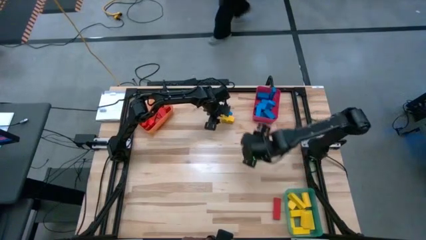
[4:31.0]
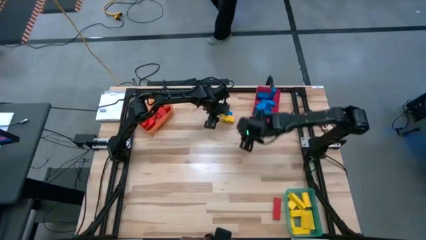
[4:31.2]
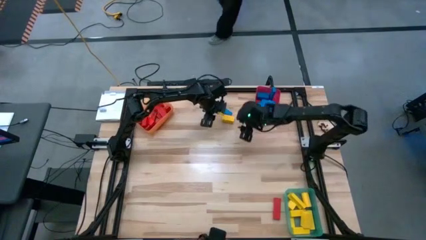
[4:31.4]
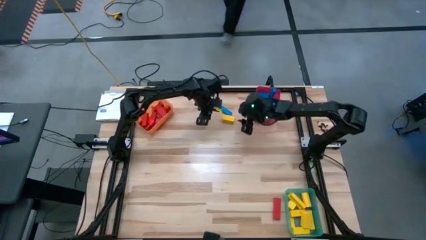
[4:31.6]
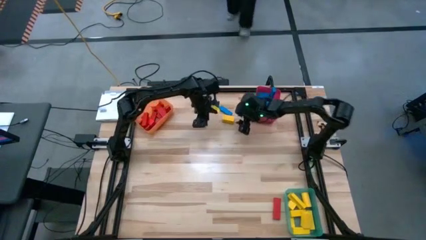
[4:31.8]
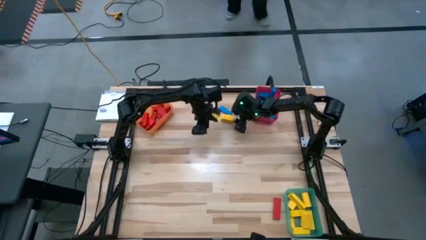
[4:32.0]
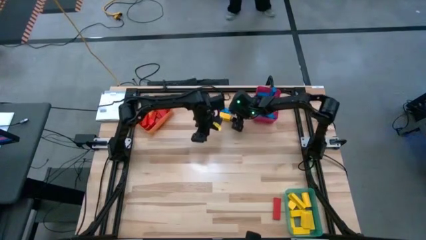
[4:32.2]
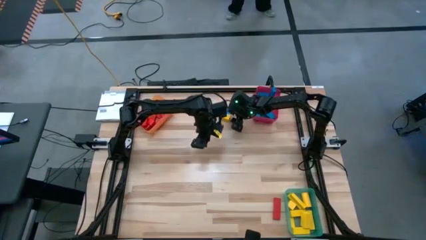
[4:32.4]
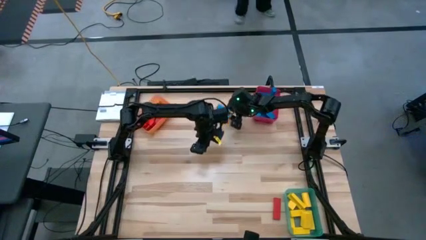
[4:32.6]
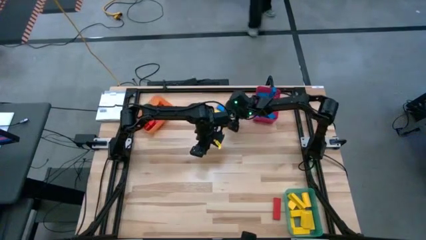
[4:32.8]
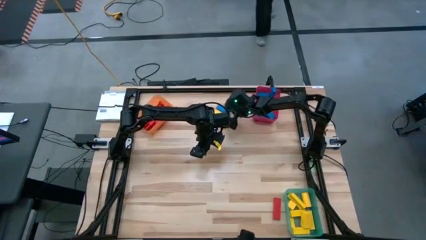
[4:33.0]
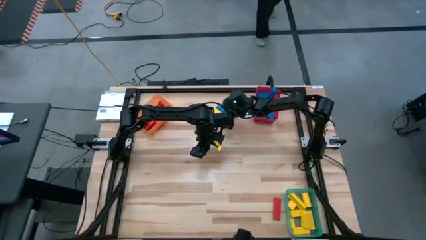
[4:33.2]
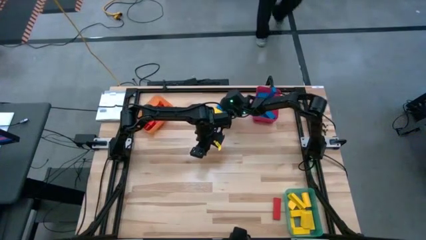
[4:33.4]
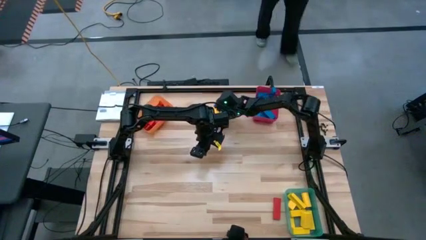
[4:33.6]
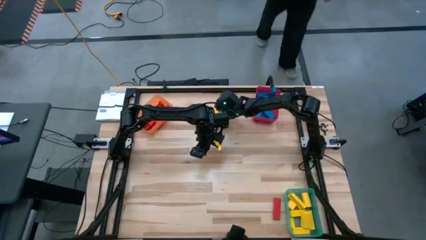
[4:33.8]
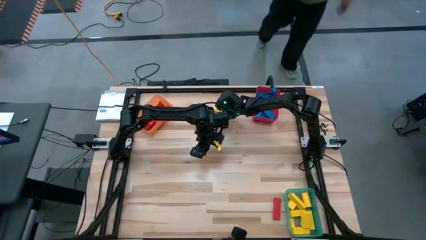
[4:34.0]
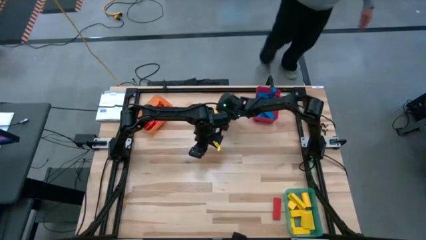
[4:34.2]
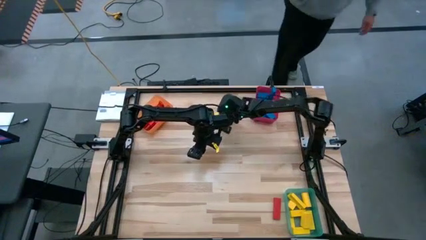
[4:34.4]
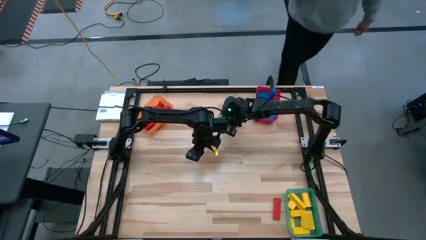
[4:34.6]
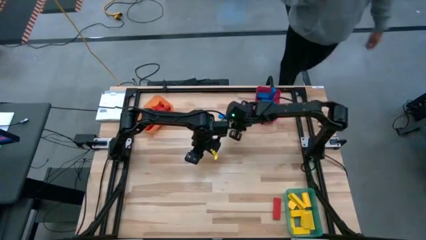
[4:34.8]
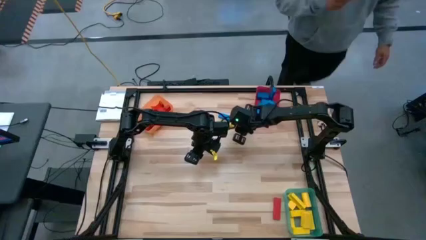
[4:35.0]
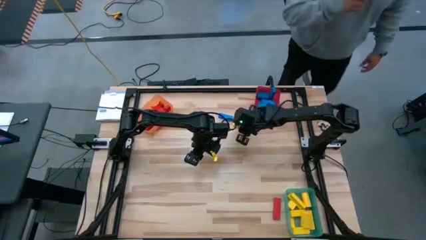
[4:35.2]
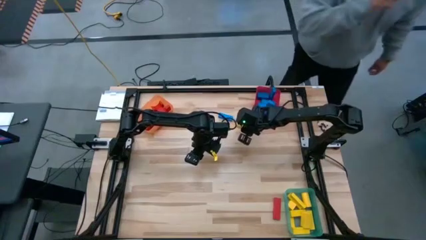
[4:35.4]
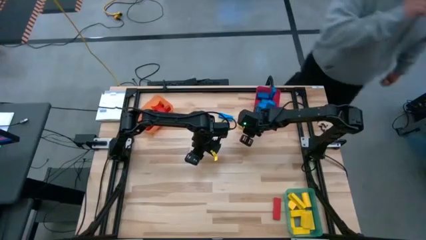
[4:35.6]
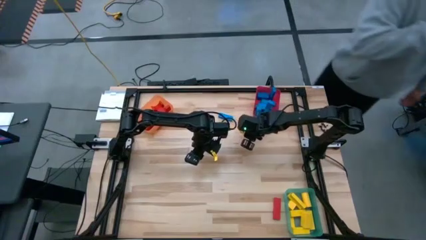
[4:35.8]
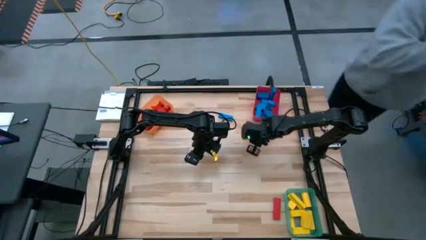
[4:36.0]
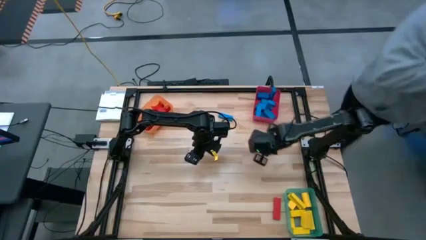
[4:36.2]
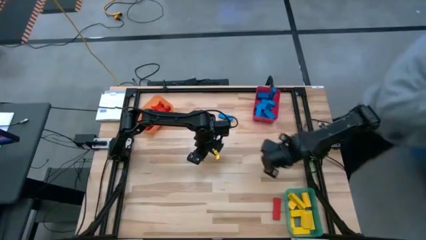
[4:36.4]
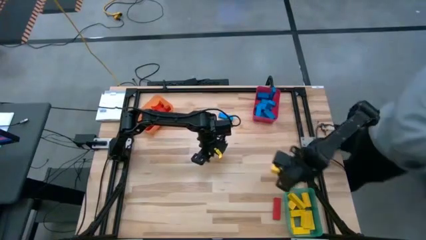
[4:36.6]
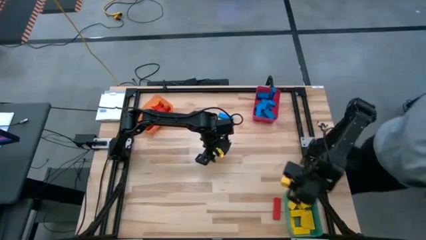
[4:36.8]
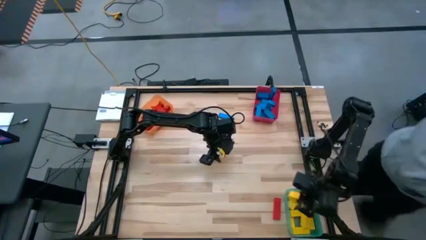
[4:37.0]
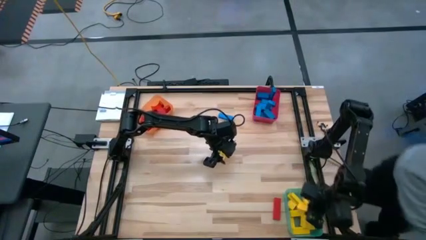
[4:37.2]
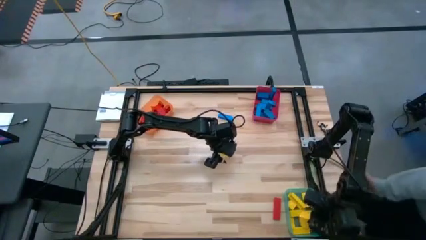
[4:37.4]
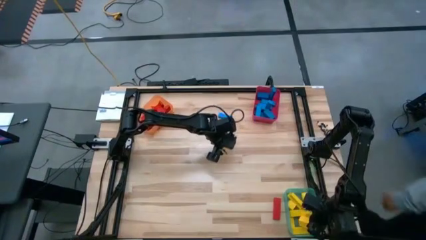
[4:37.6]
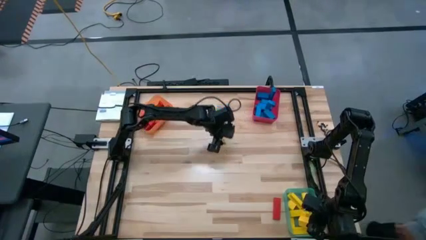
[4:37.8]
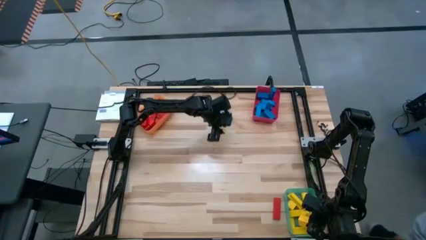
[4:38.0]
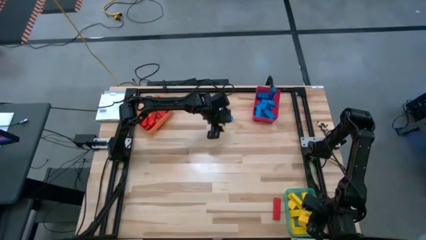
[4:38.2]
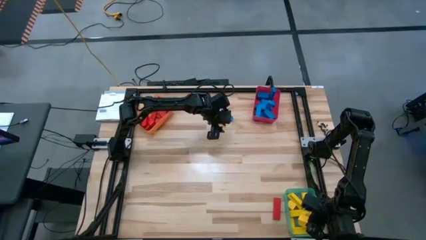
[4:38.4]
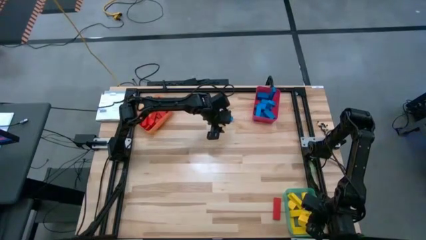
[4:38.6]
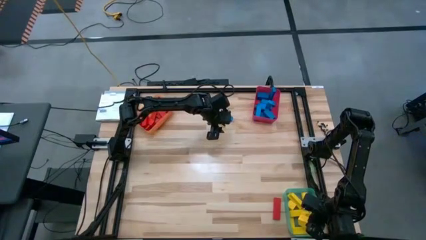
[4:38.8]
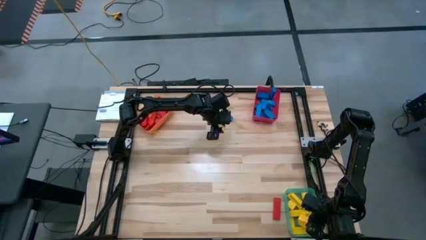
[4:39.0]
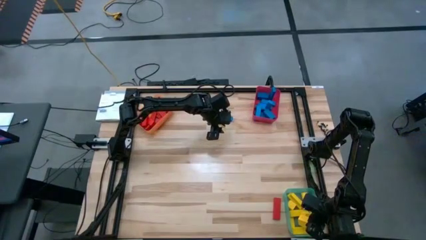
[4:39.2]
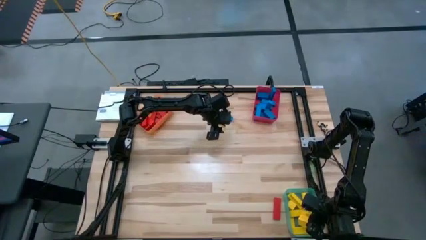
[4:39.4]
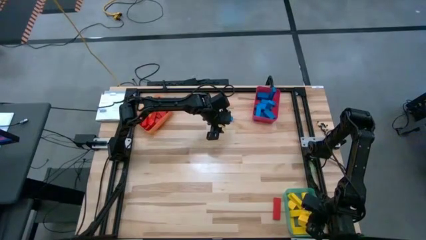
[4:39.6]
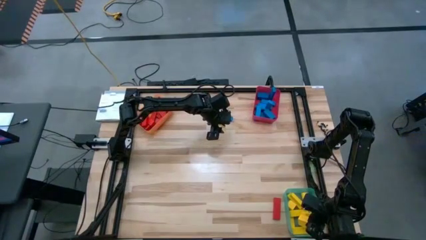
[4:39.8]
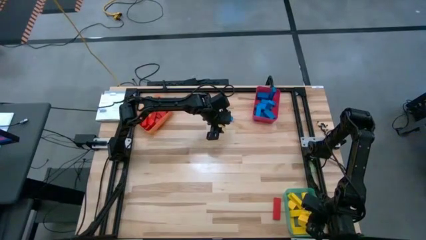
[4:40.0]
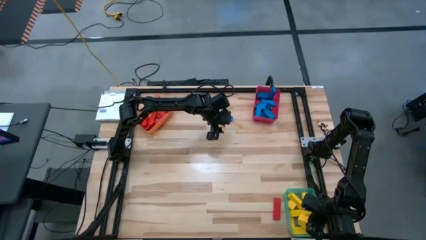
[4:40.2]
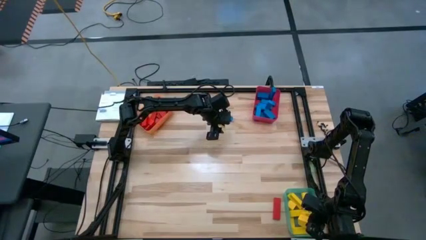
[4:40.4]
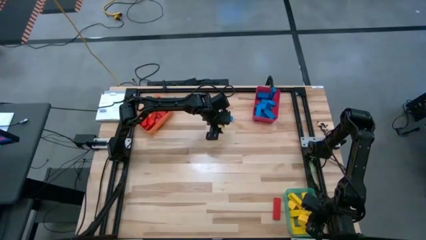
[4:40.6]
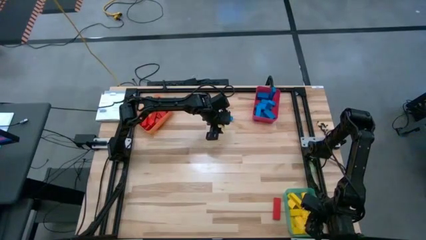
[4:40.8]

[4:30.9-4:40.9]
Task: Sort blocks
Put the yellow block into the green bin

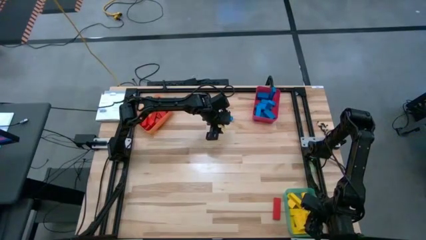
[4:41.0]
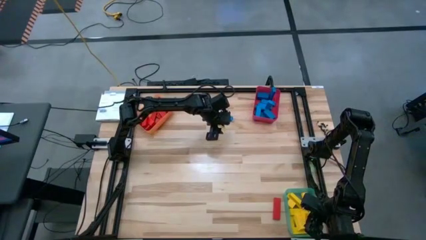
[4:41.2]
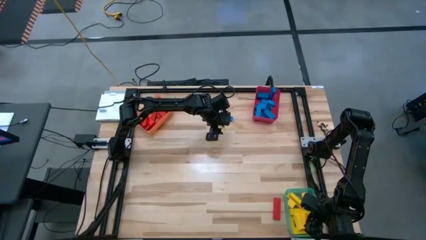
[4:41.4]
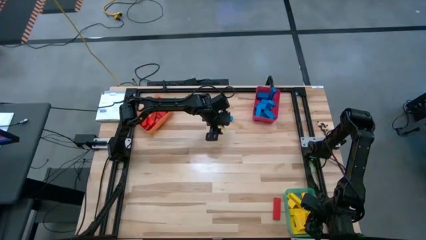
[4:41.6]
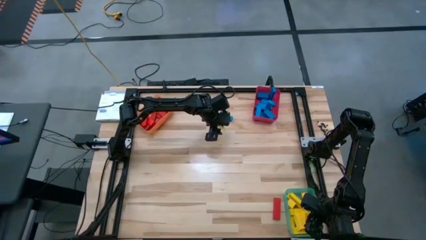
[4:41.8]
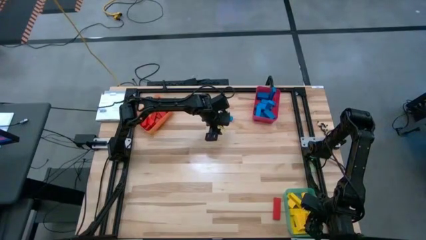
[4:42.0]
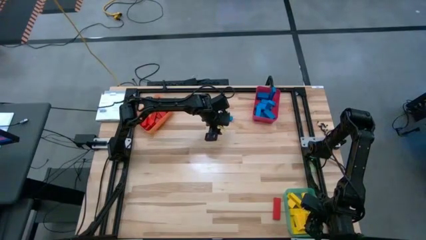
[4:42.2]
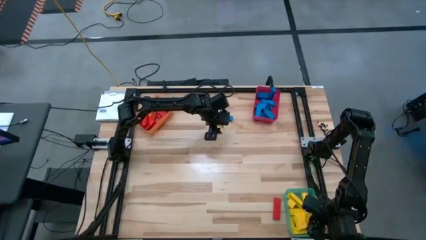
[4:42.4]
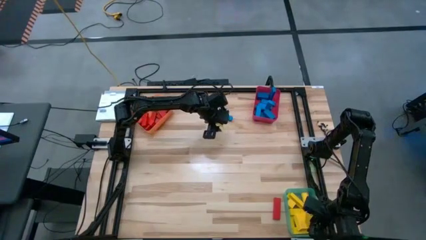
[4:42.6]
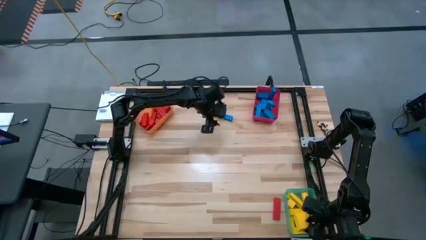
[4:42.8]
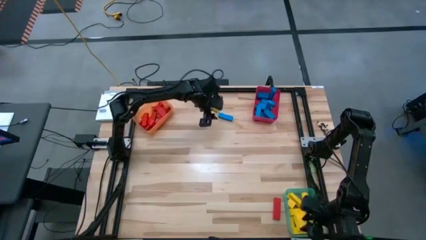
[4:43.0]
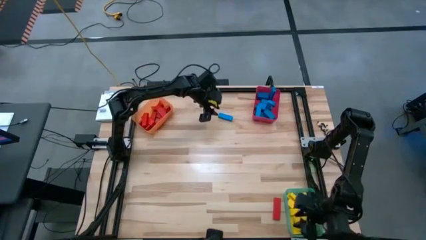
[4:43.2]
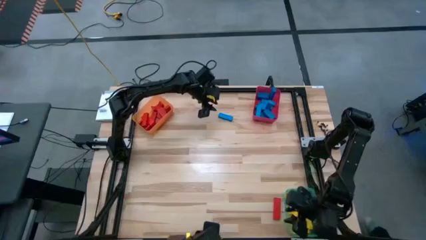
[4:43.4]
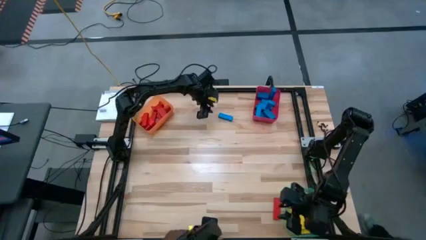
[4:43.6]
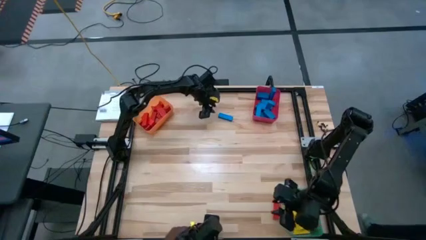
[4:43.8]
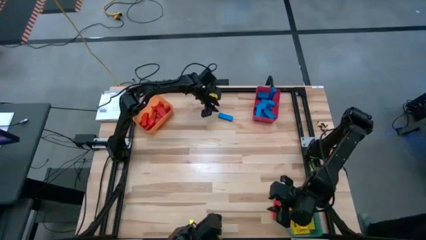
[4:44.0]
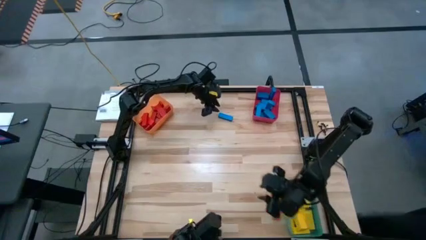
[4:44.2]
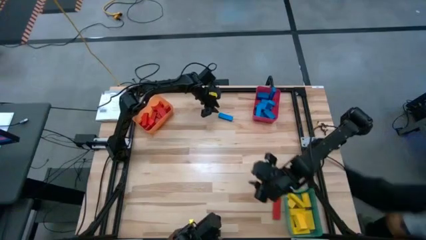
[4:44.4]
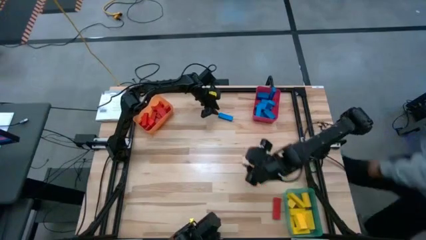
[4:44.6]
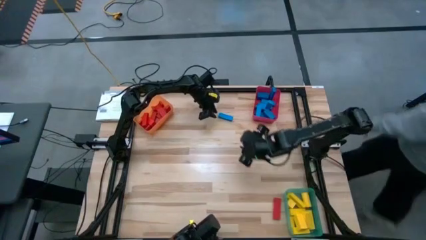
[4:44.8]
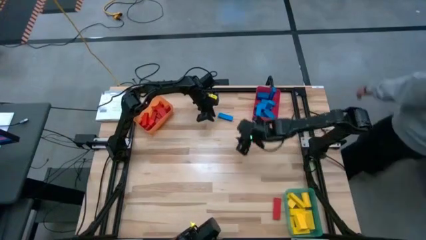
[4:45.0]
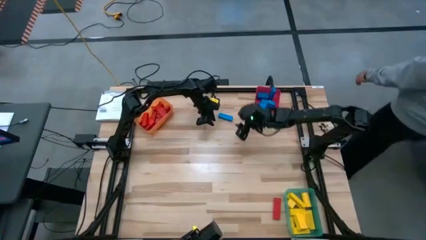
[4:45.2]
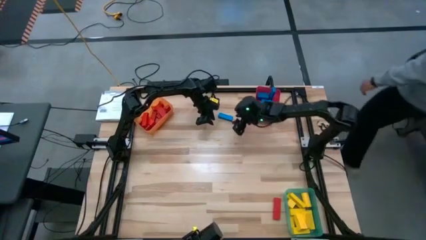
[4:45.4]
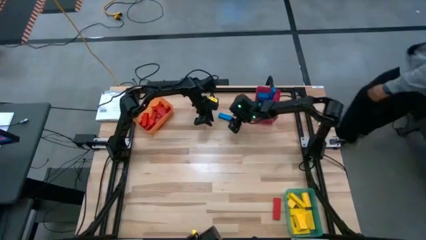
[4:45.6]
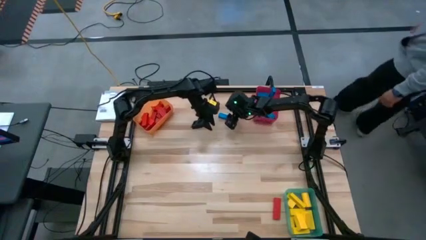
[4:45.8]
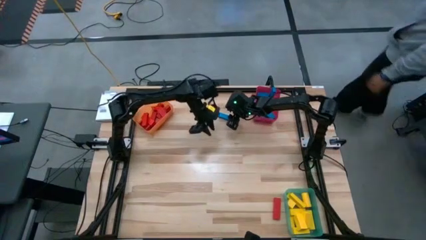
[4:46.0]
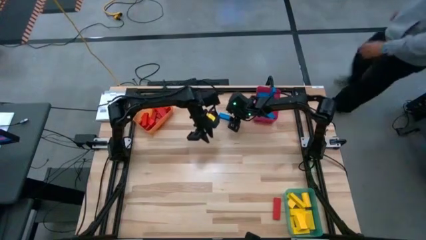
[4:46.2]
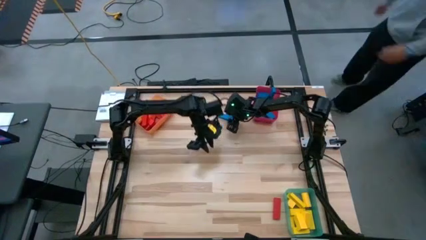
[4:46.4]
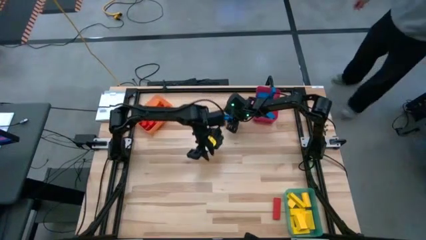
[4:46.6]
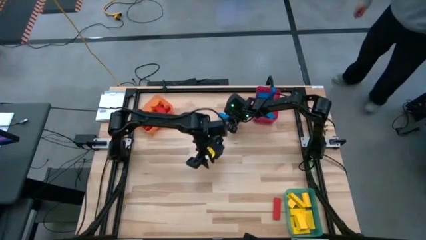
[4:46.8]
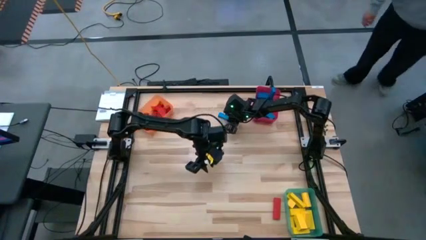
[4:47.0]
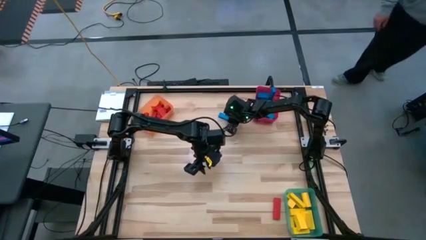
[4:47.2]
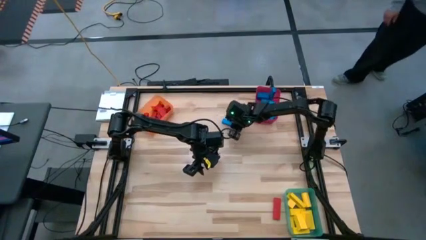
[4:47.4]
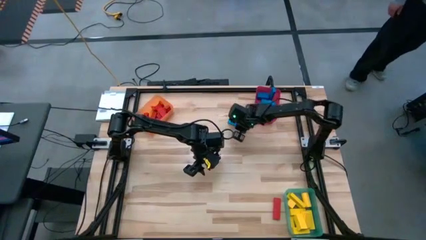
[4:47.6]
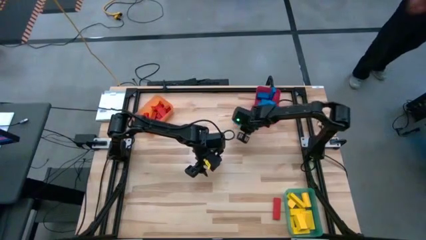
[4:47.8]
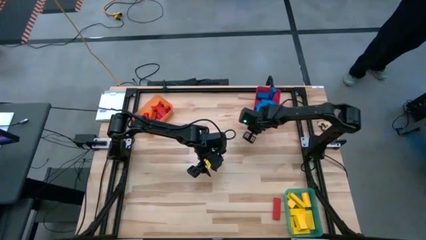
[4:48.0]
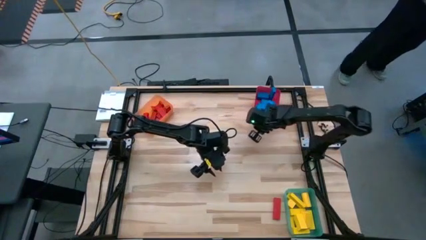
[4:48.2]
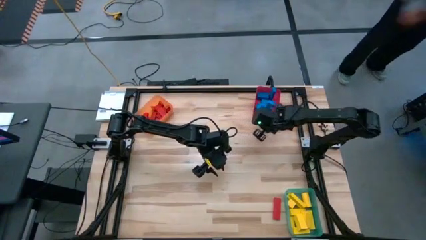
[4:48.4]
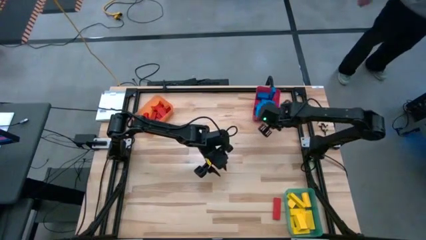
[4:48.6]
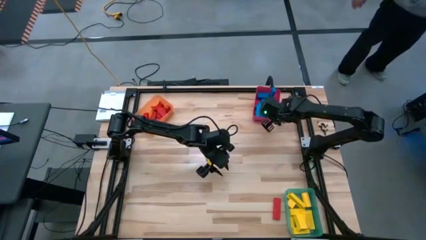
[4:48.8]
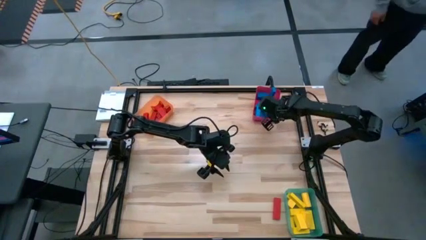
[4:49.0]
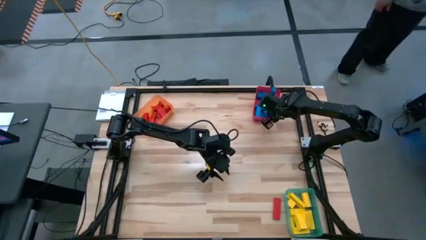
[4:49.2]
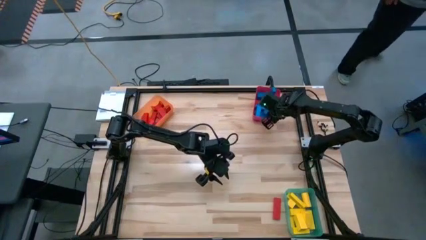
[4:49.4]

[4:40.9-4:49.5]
Put the blue block into the red bin
